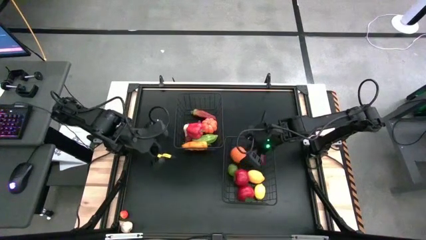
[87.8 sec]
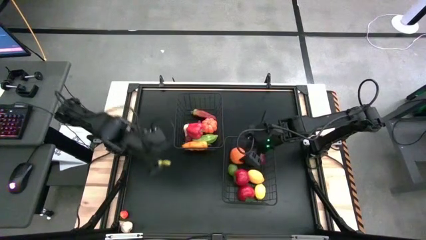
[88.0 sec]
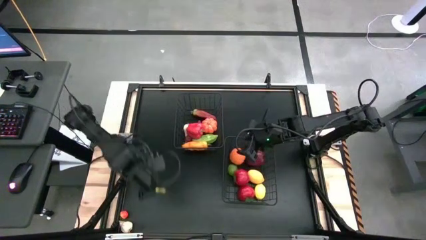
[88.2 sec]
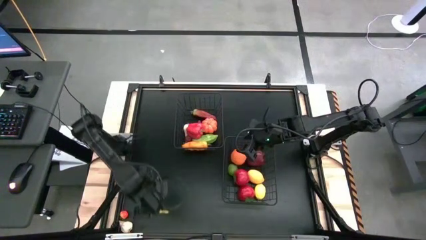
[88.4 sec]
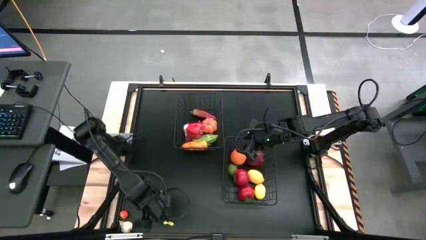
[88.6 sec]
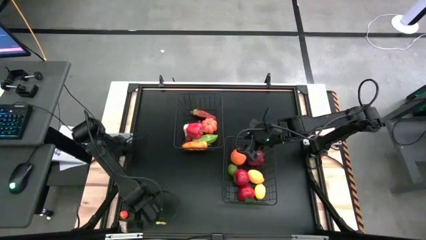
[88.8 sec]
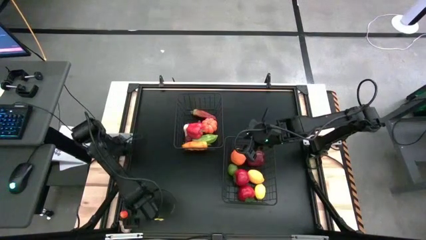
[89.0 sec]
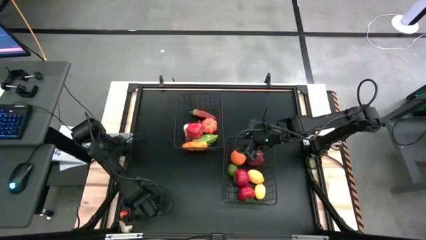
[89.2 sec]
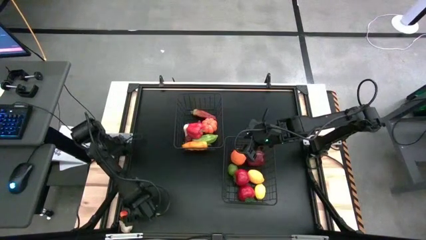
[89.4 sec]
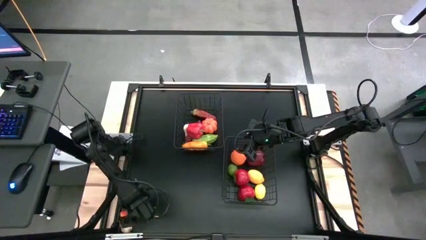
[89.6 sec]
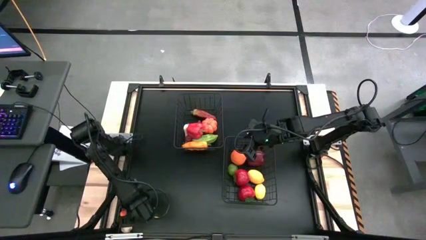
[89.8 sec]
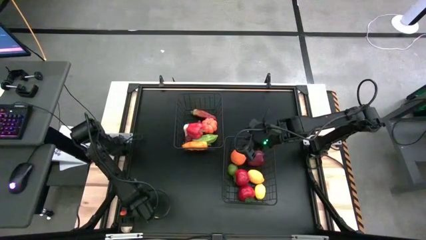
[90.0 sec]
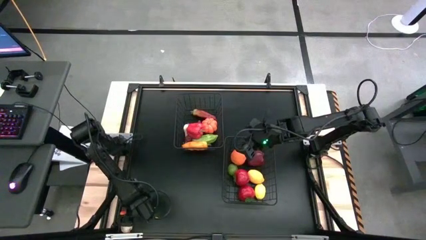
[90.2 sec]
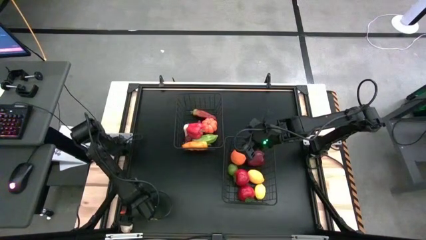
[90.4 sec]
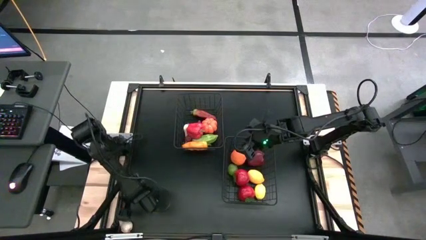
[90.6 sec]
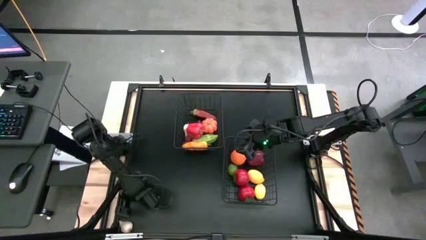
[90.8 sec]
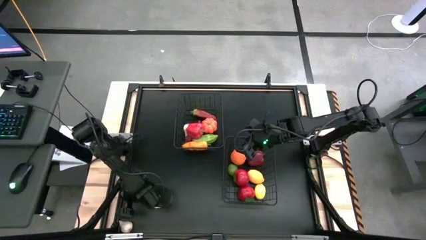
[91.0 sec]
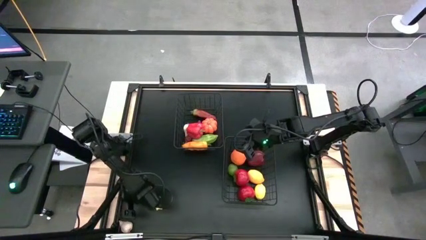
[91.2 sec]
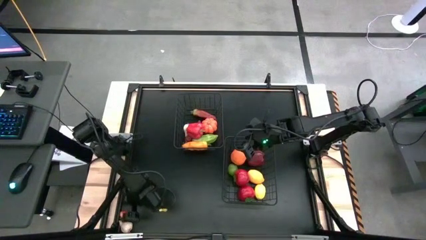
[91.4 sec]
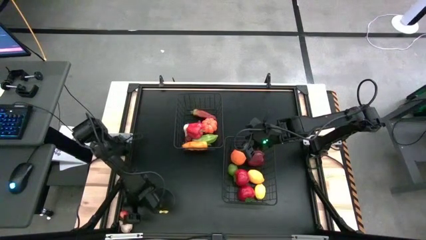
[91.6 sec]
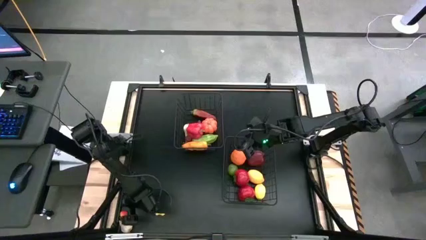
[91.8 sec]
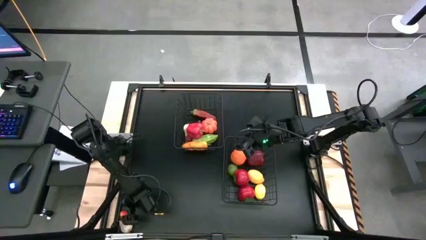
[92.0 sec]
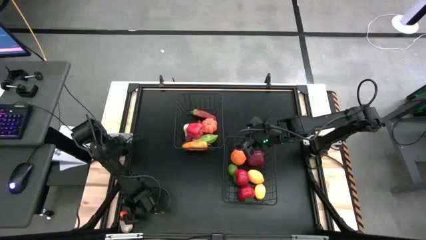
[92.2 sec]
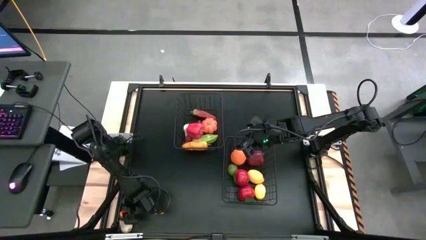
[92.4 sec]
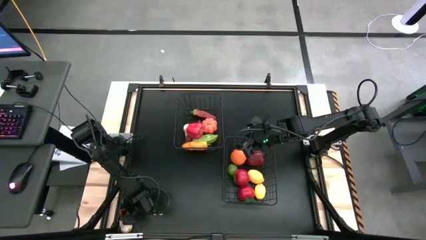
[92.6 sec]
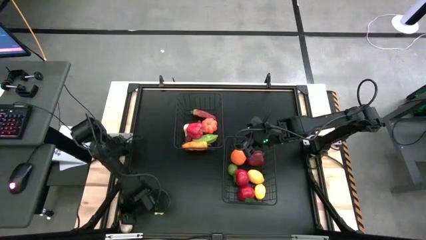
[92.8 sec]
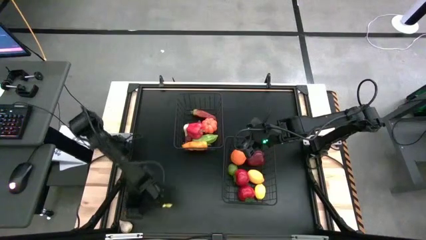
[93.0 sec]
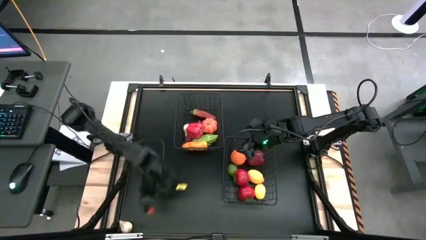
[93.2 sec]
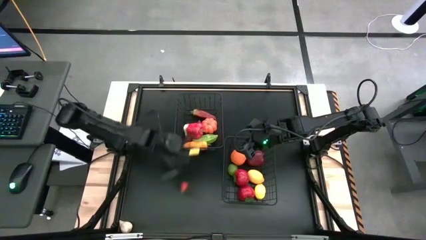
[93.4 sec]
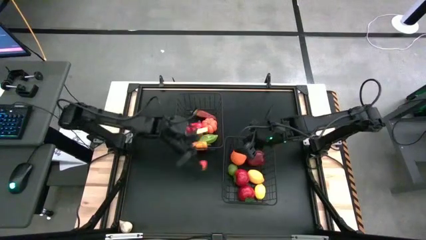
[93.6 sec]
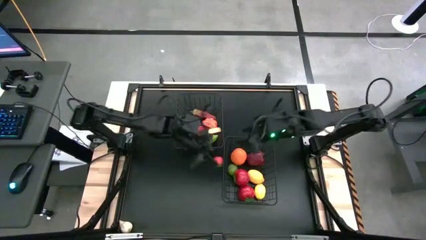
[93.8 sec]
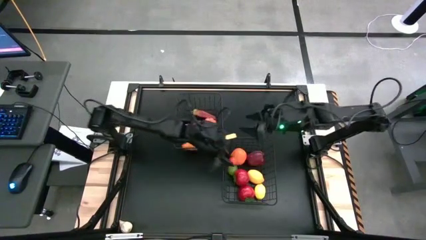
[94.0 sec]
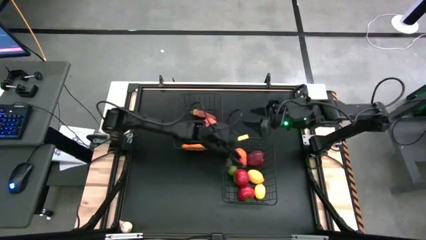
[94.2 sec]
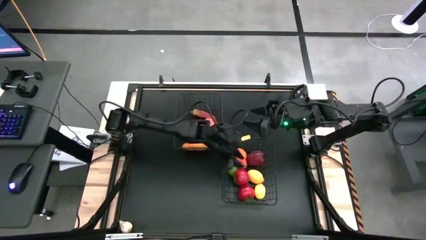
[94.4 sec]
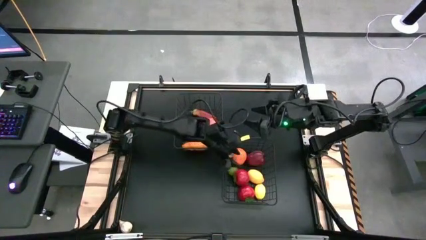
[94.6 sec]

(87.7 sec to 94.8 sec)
Task: Sort produce into baskets
Put the red tomato into the bottom black wire basket

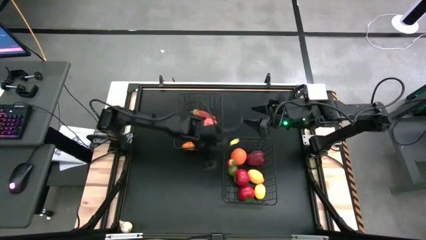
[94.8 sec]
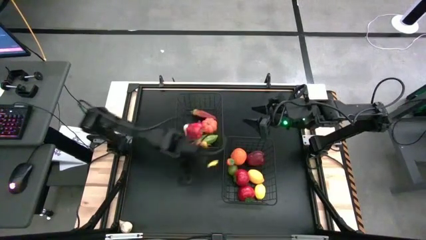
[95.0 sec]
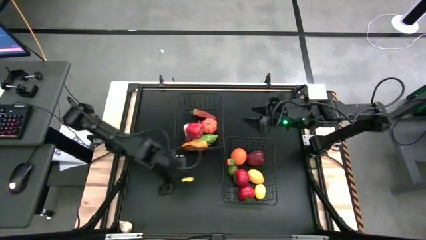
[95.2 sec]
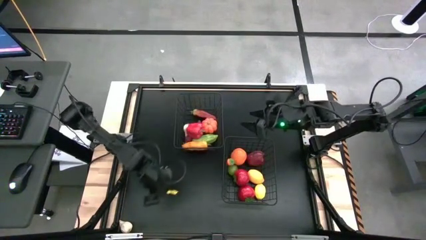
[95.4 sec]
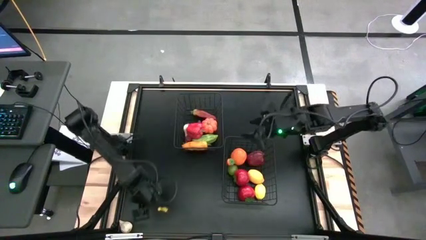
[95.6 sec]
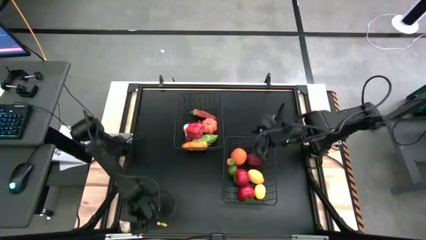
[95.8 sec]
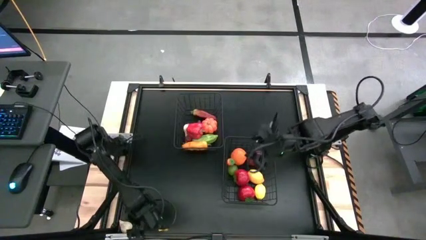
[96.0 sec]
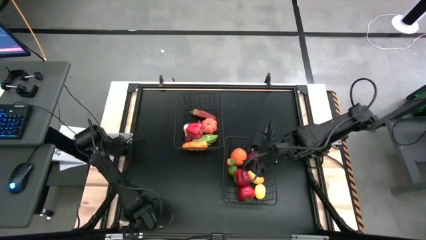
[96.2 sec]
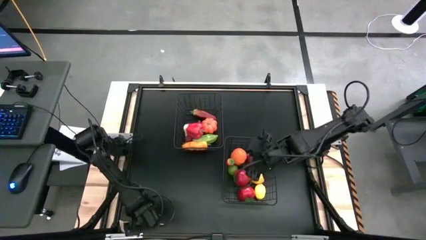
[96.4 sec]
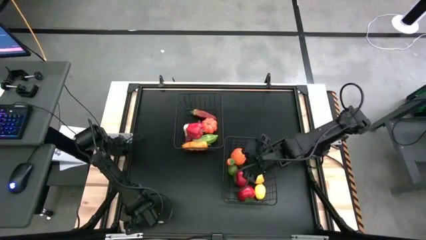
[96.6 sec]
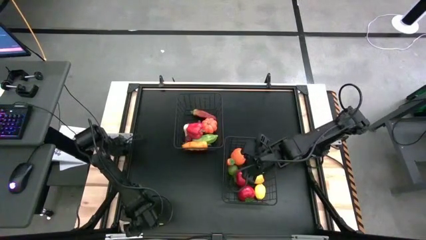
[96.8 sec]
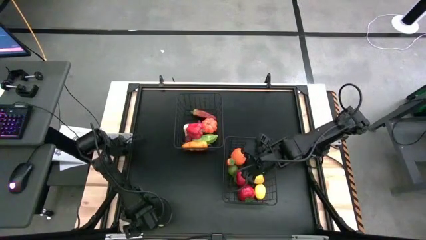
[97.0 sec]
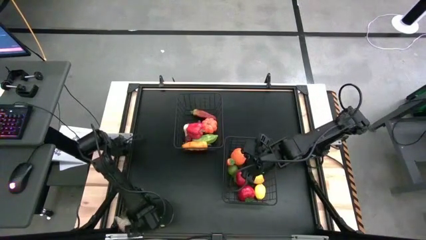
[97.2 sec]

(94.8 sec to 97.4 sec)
Put the white garlic into the top black wire basket

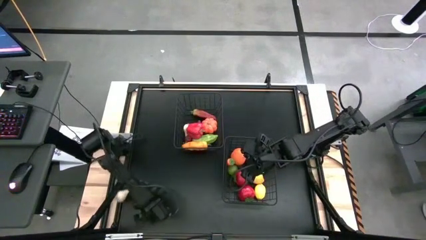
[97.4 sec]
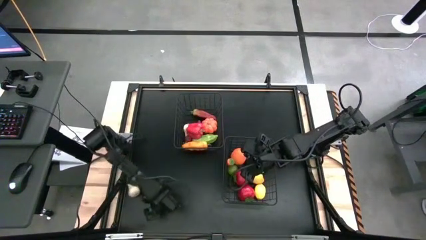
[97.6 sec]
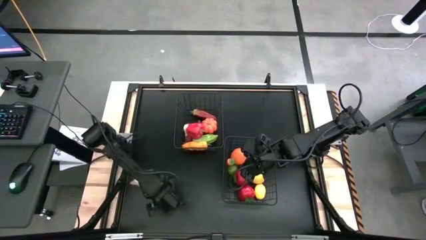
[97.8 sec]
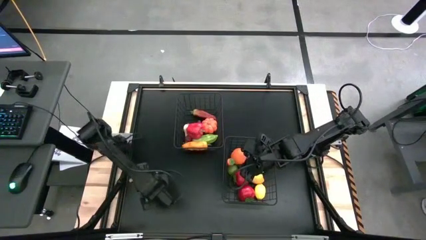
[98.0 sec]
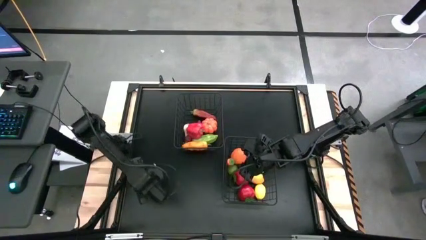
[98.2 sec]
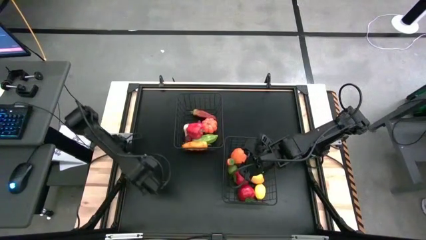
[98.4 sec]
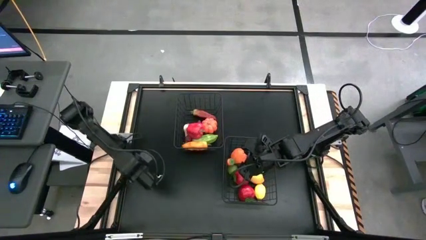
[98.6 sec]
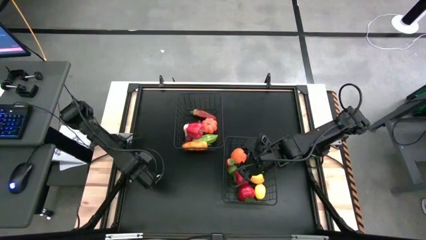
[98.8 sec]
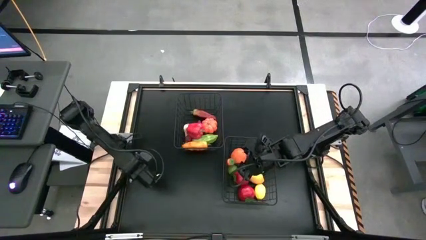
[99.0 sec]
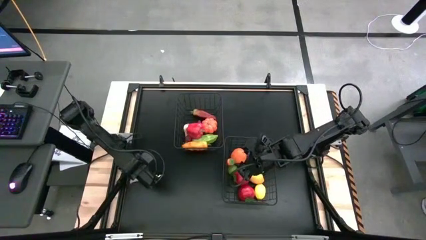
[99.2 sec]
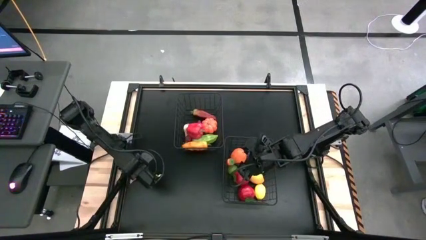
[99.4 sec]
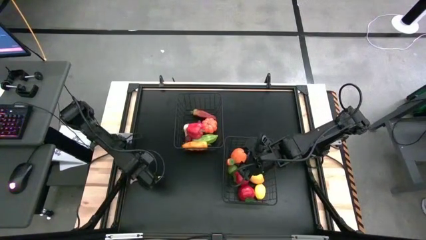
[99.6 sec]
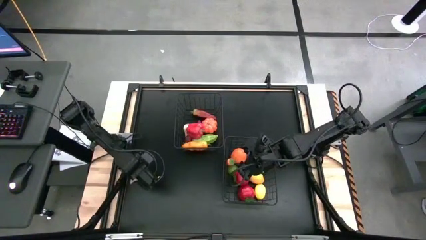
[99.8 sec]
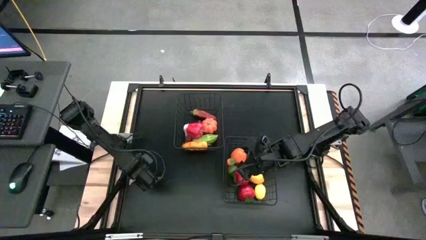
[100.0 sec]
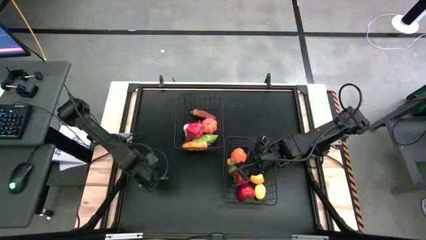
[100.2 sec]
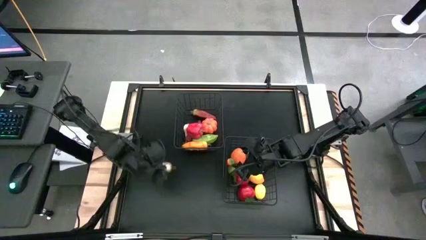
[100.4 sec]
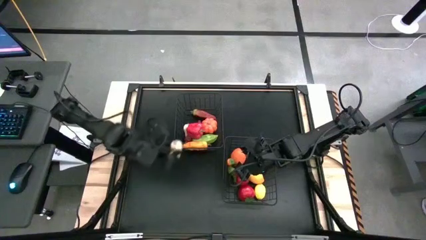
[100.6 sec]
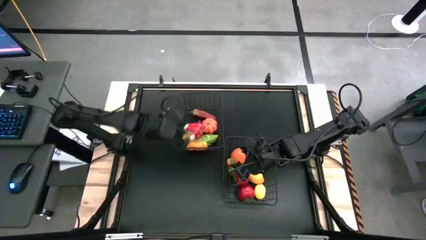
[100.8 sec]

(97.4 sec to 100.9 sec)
Put the white garlic into the top black wire basket

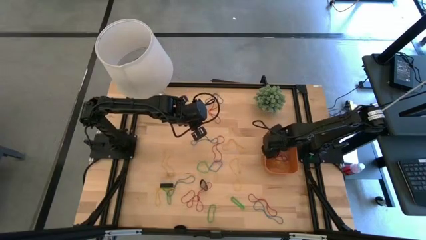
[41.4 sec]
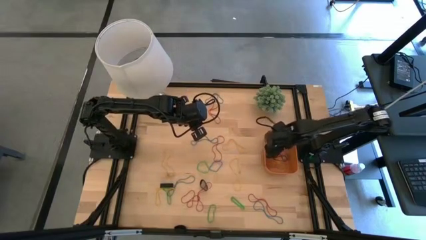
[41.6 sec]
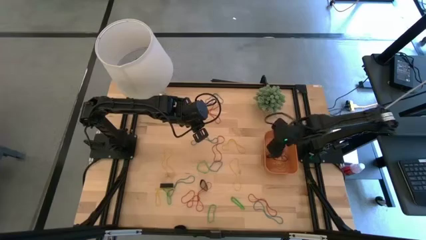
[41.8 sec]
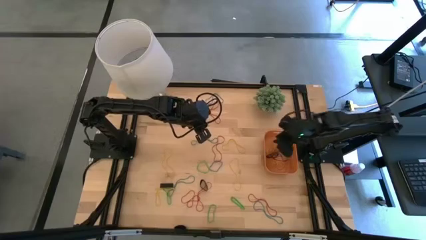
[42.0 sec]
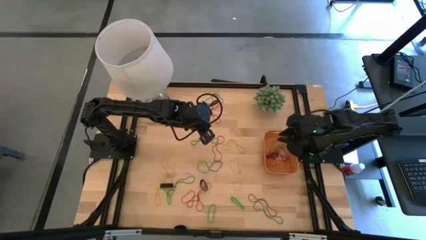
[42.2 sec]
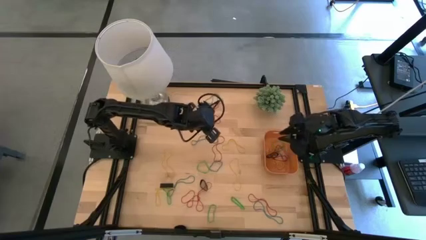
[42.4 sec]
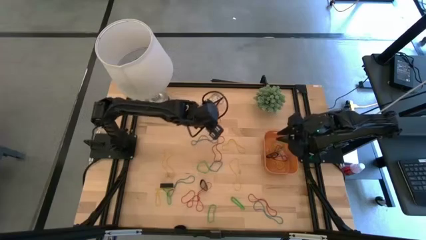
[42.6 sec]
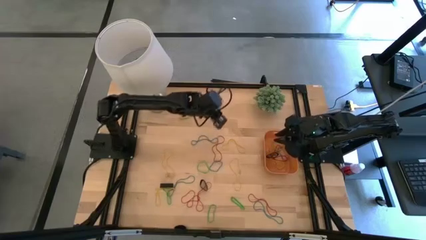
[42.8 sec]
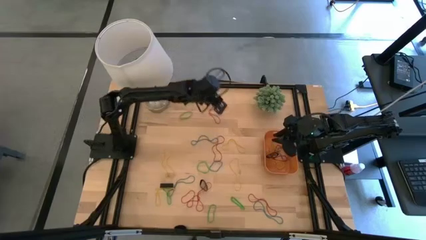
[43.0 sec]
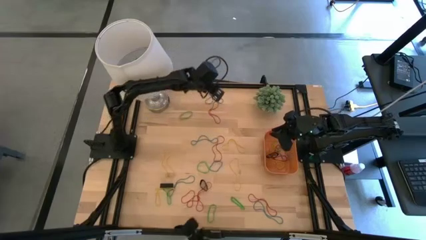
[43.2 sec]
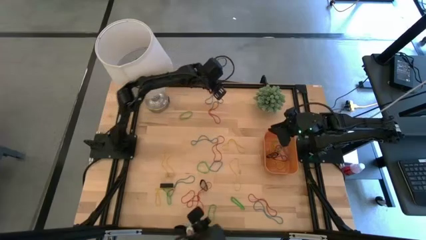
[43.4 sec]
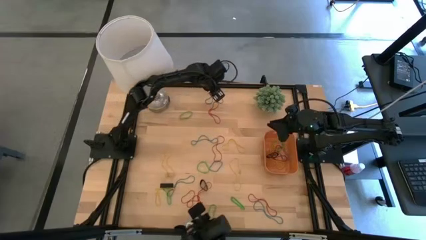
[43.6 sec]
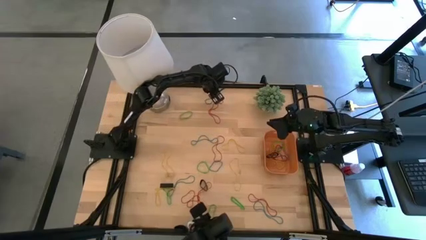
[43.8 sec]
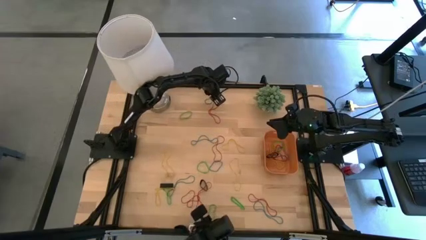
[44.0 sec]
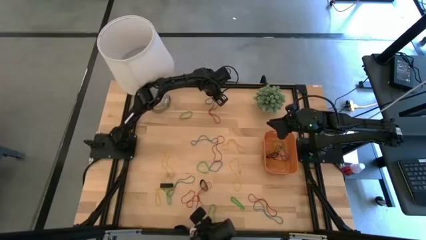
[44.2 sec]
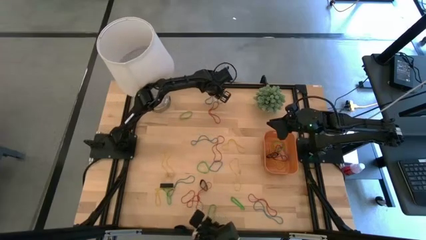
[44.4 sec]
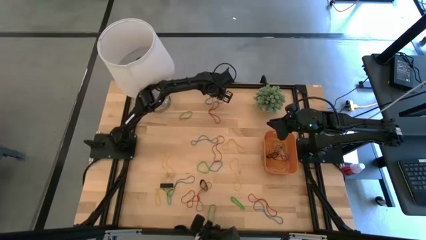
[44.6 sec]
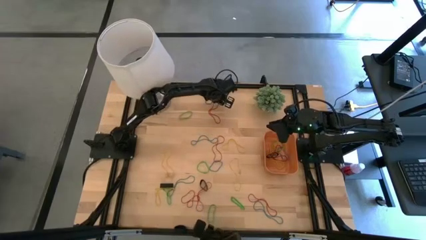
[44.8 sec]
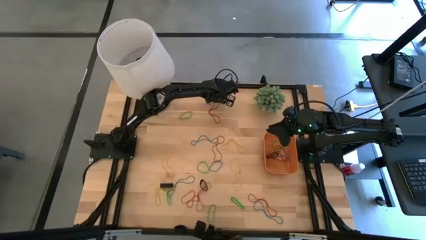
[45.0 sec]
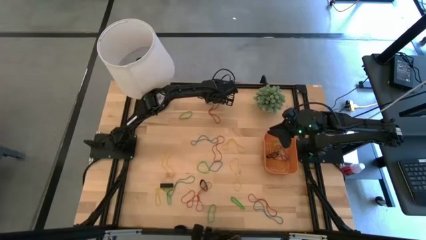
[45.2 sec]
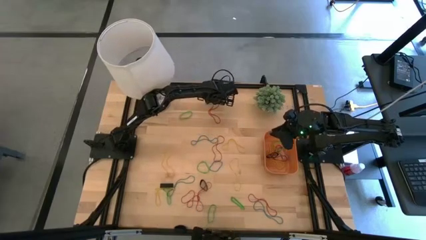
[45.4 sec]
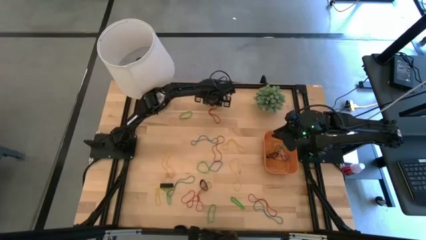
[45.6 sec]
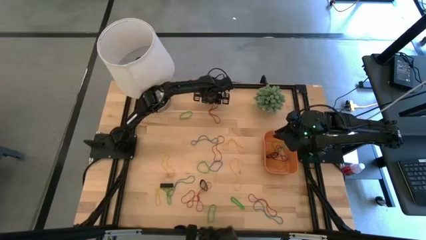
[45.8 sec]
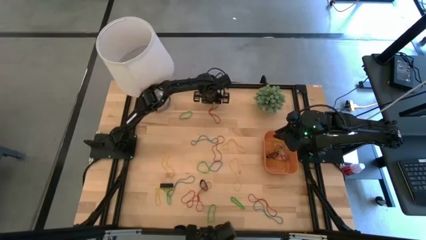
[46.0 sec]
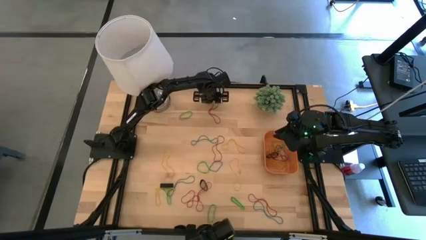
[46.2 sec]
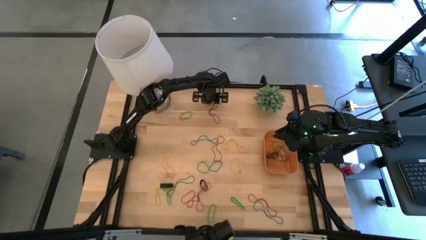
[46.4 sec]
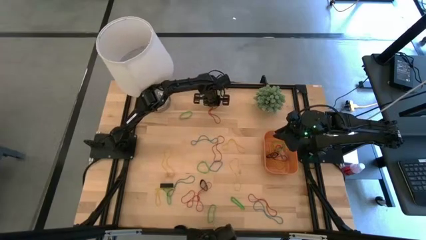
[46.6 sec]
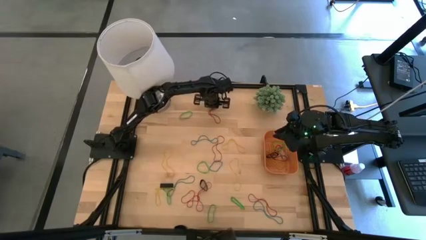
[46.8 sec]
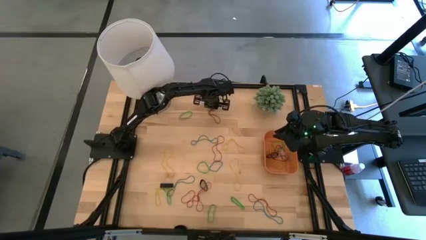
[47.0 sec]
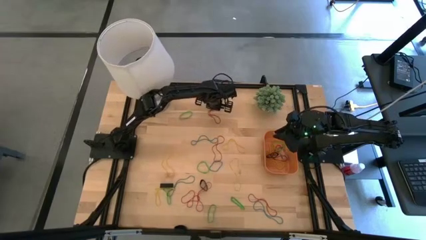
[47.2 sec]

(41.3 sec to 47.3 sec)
Task: Pick and place rubber bands into bin
Put the red rubber band into the orange bin
